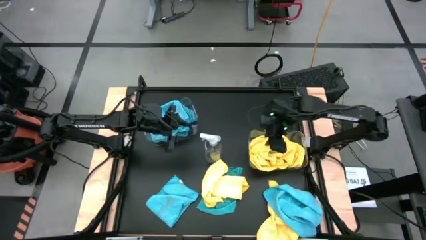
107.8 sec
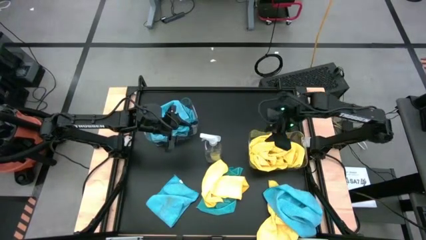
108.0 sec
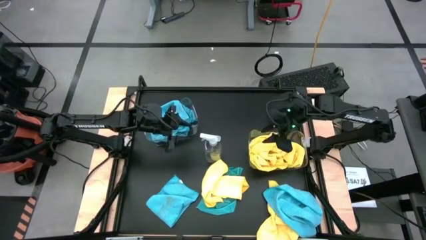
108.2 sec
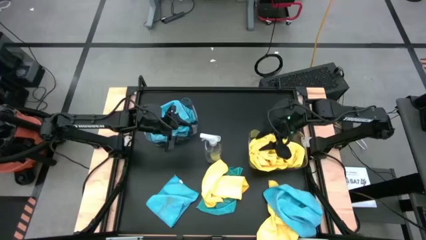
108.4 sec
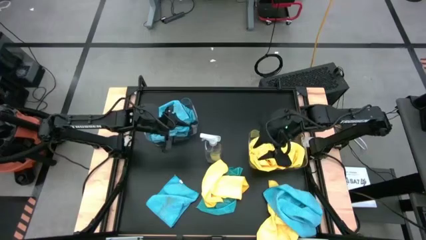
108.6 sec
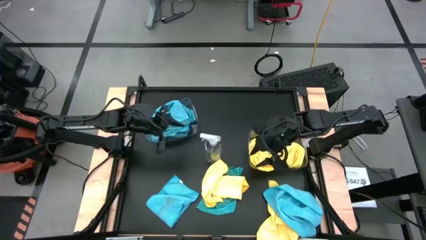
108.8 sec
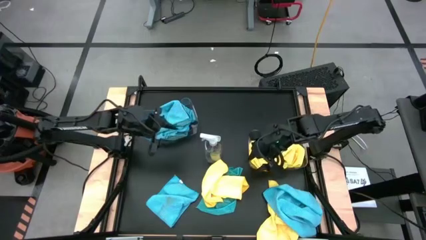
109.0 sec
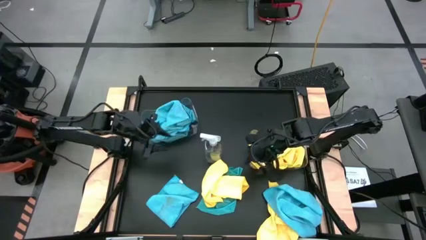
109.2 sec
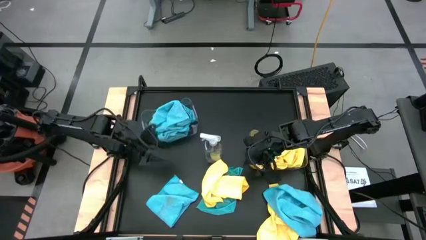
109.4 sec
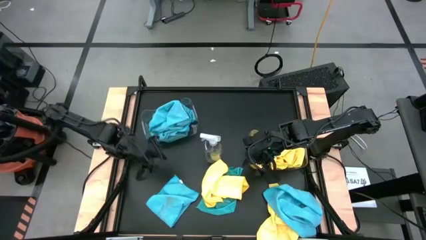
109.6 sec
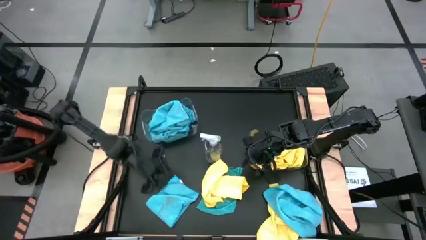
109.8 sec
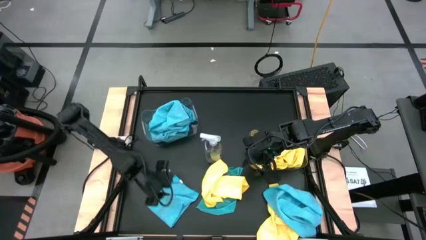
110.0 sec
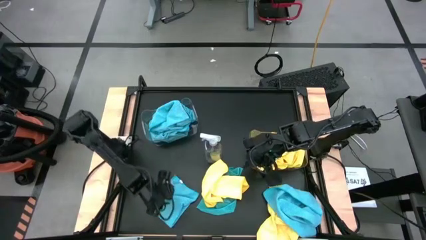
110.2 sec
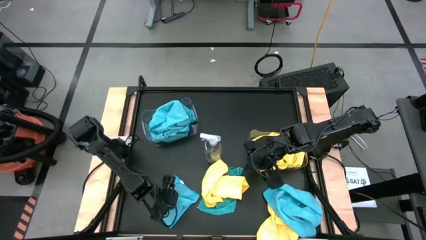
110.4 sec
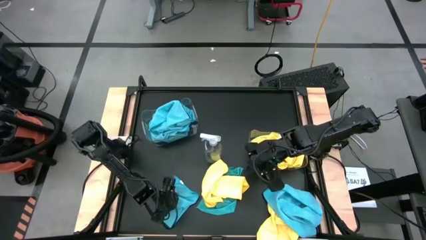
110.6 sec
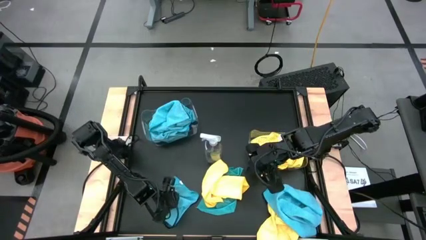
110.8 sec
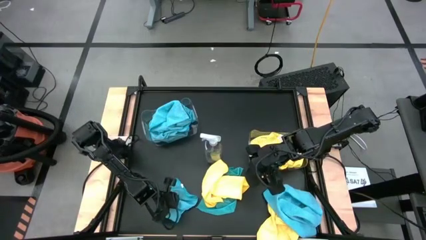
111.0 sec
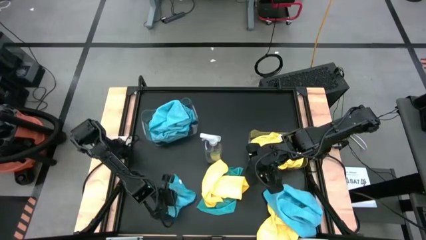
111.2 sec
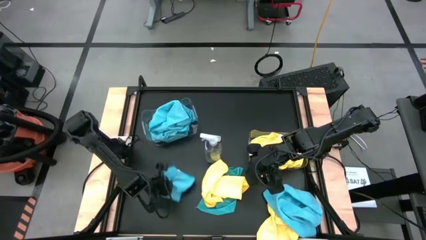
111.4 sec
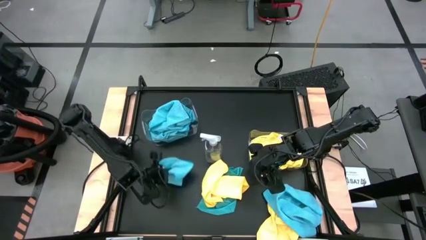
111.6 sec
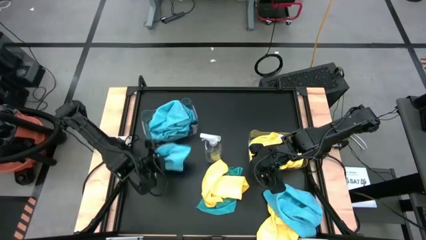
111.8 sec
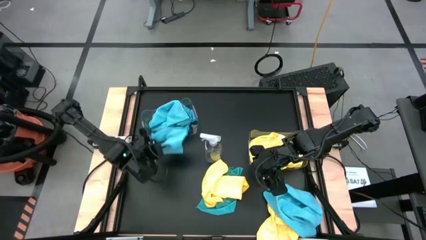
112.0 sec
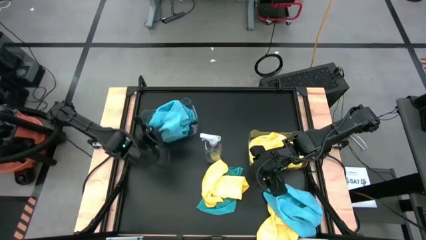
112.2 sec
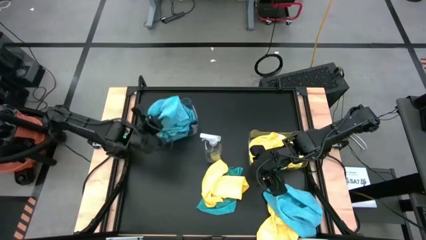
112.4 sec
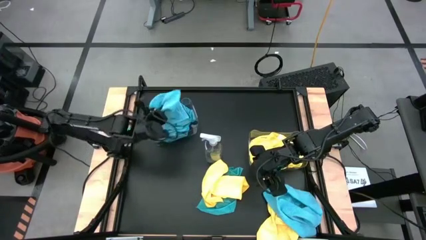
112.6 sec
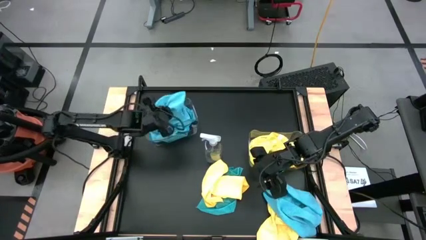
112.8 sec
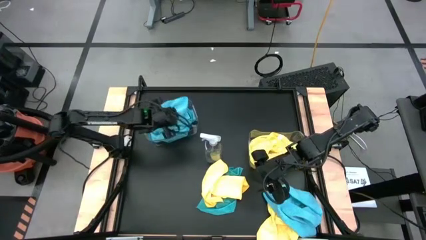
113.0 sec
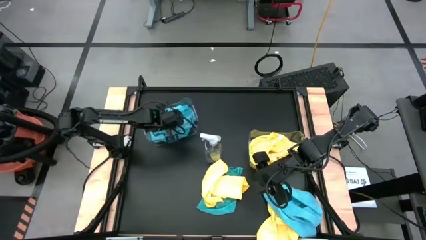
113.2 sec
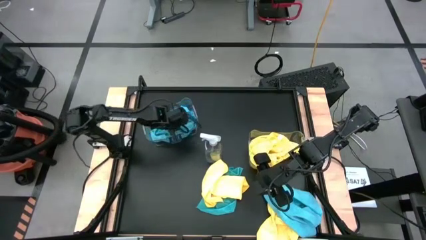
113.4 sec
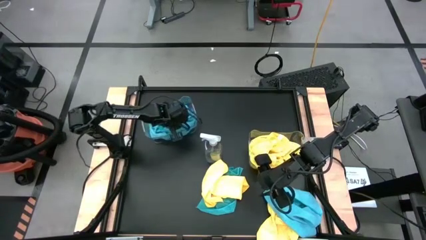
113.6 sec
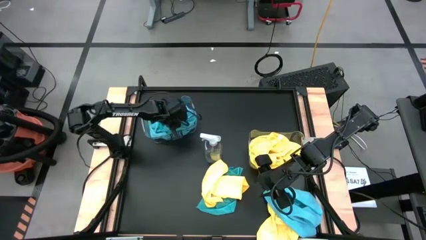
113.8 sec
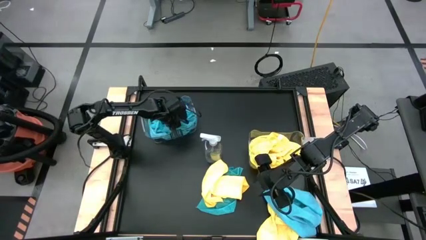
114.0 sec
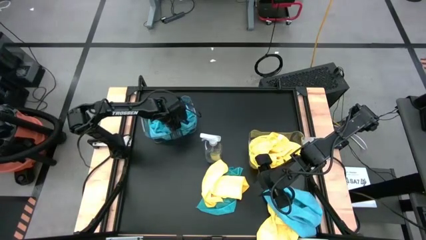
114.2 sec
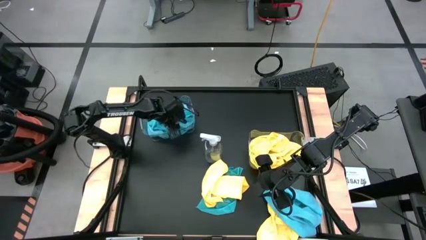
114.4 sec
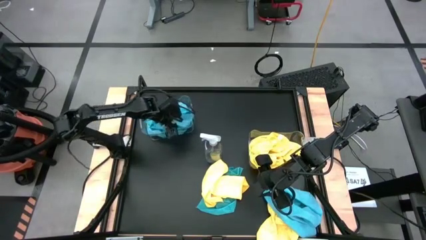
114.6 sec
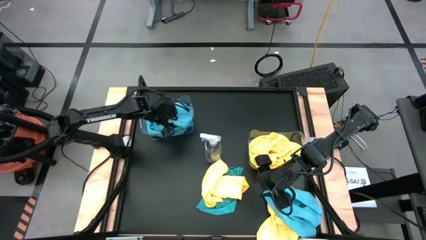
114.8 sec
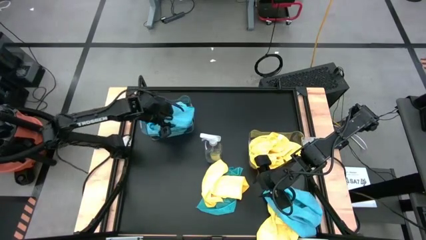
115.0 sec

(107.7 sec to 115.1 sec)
Task: Sort microfiber towel by color & place in baskets
Put the blue microfiber towel into the top transparent bin

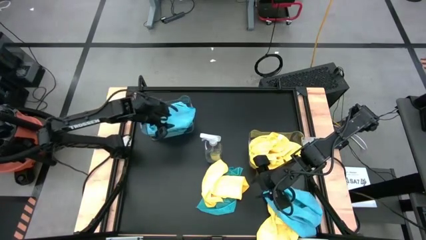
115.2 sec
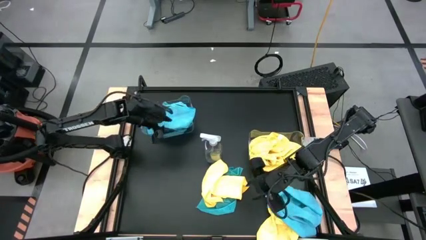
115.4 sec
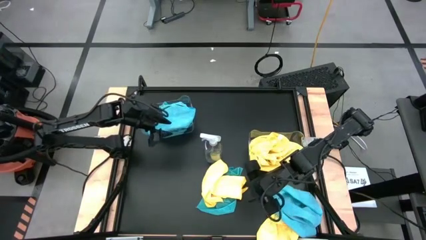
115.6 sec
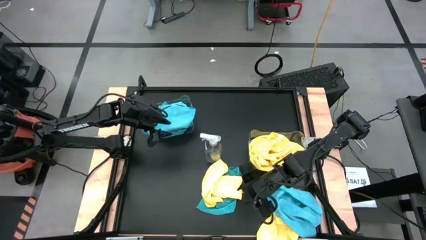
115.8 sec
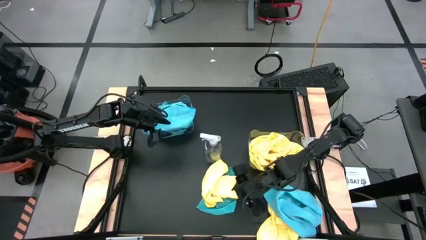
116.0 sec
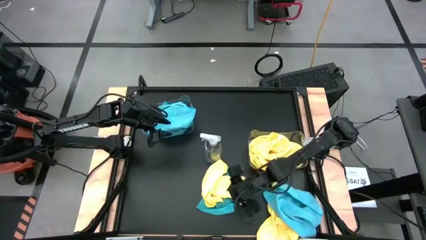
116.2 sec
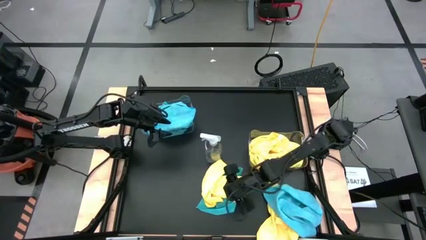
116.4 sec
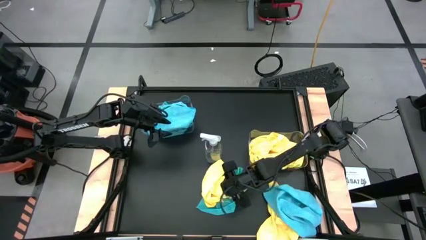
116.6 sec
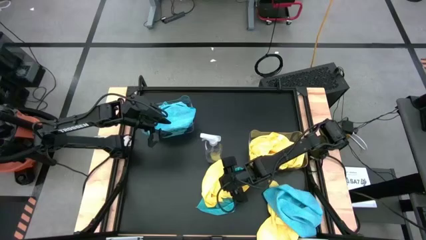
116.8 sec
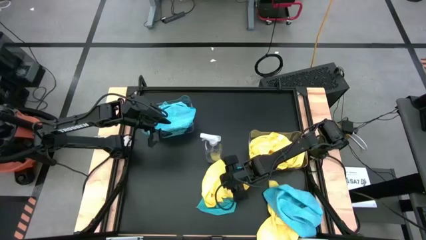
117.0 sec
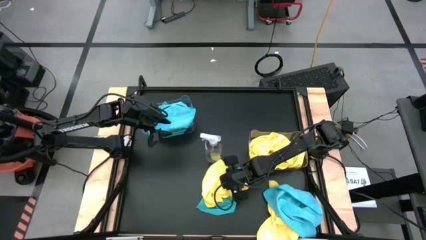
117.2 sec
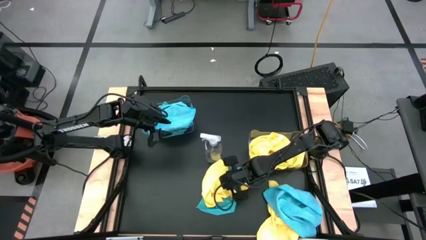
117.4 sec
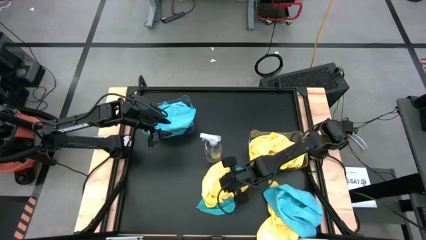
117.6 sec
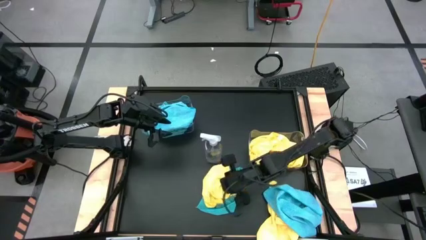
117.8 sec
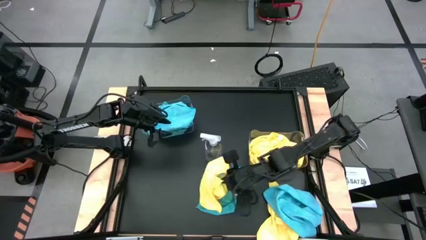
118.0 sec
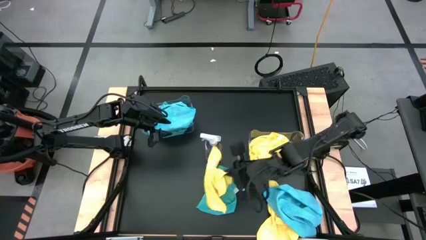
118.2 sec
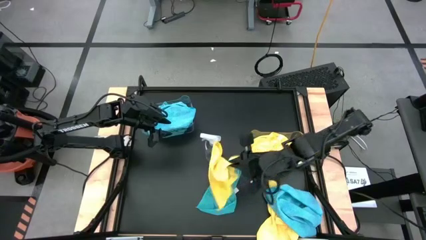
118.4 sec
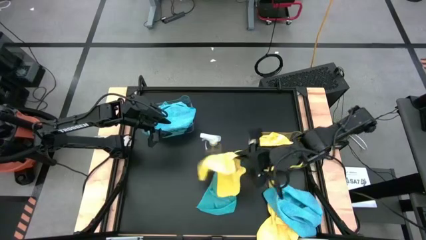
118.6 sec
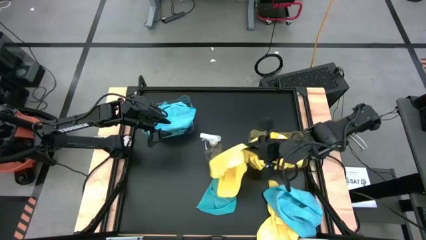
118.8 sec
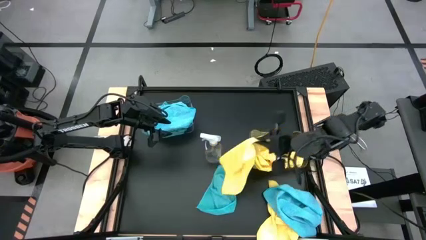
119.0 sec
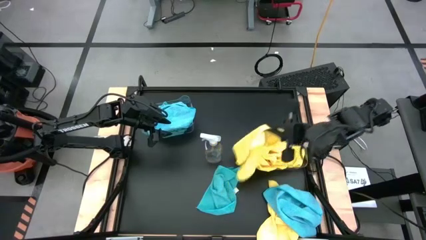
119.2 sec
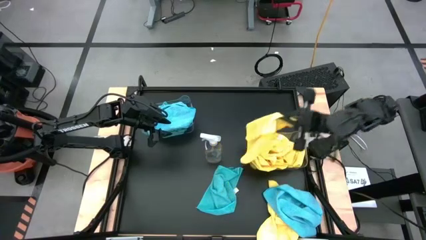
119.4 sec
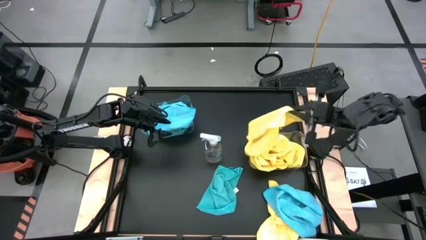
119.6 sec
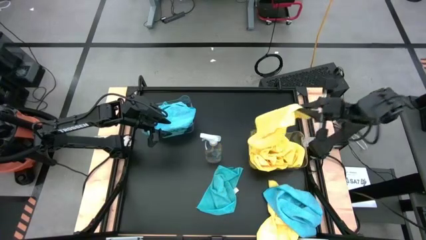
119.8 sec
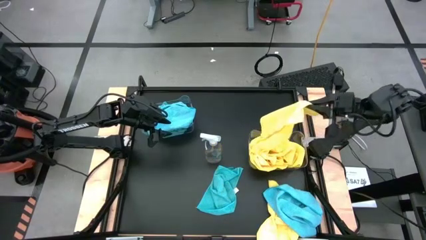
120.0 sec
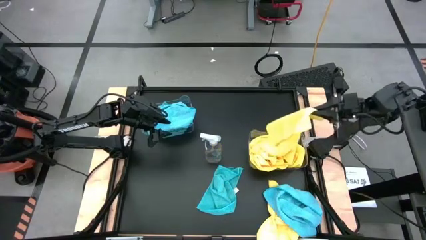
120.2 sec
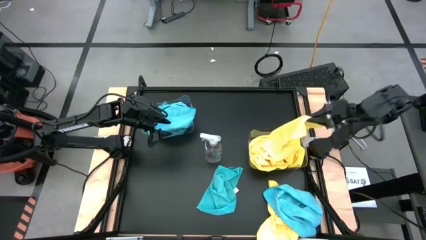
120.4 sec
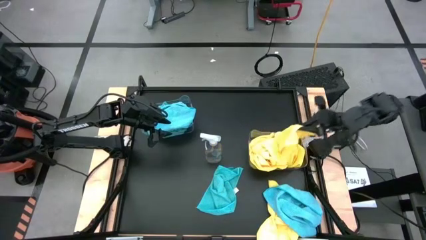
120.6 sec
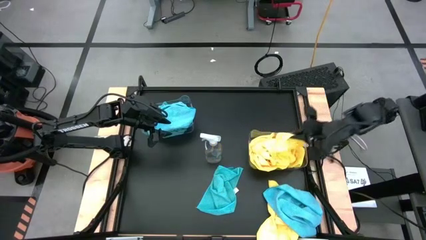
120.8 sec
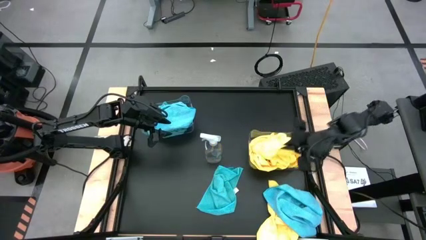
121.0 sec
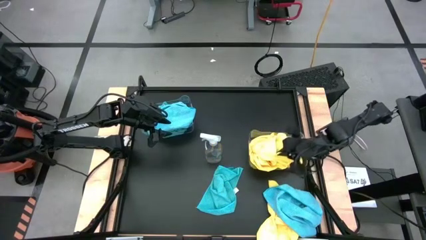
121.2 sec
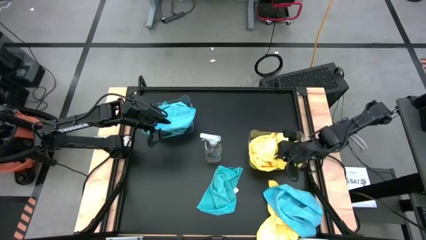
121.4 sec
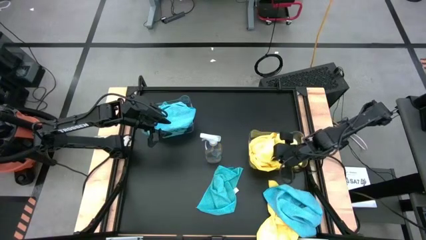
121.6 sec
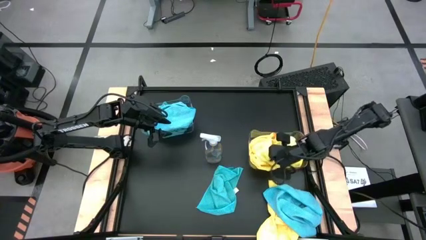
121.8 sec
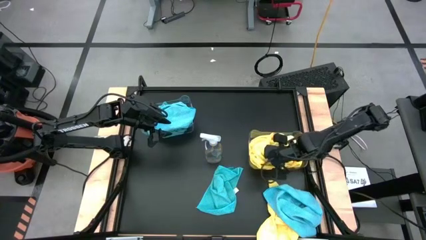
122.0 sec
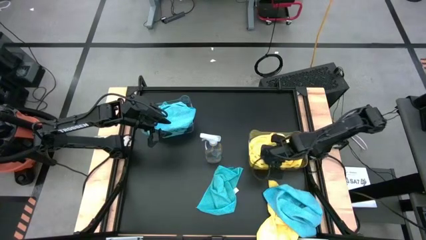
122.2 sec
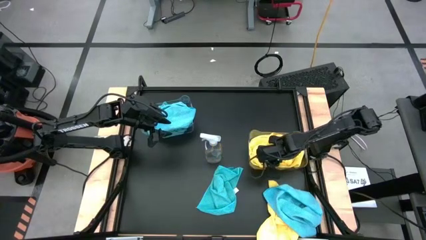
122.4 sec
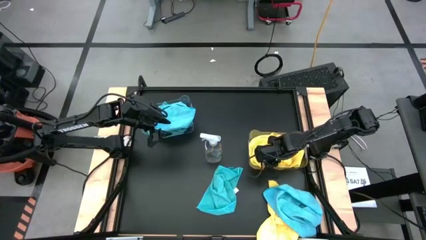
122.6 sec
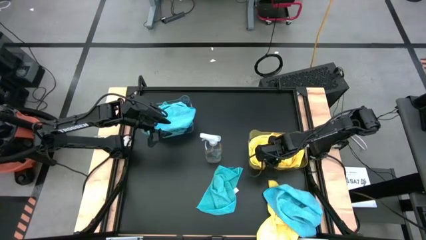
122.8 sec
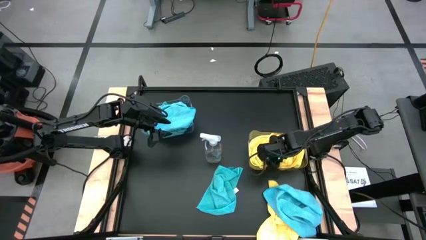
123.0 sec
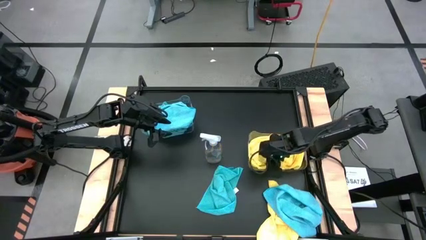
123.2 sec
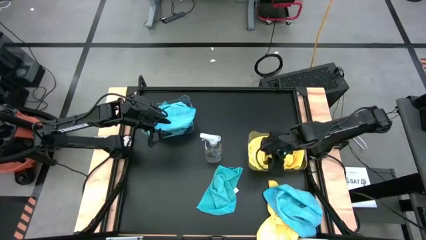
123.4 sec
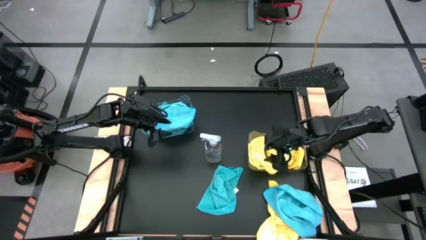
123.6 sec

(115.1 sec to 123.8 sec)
Put the yellow microfiber towel into the bottom transparent bin
